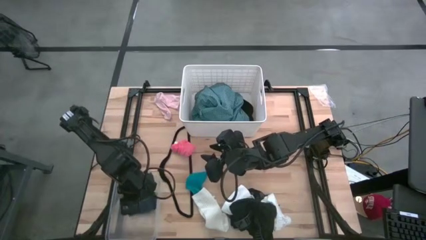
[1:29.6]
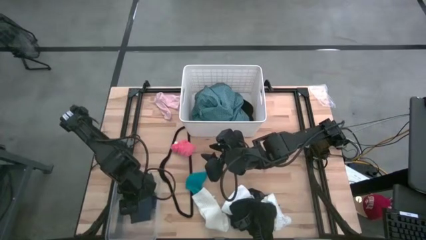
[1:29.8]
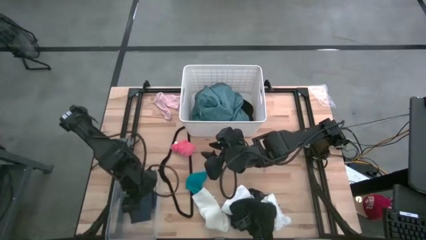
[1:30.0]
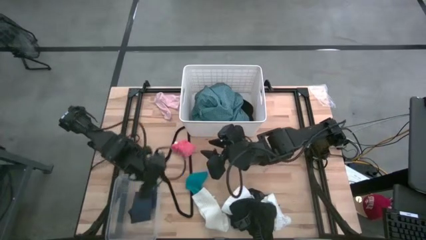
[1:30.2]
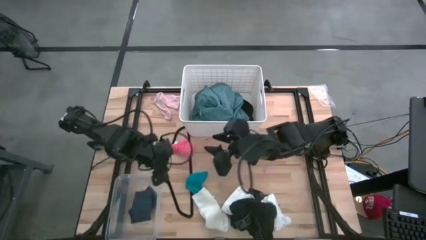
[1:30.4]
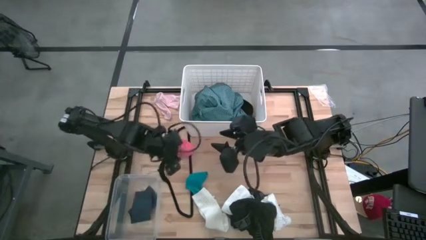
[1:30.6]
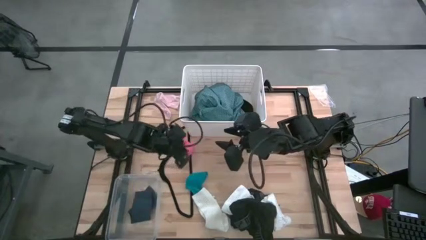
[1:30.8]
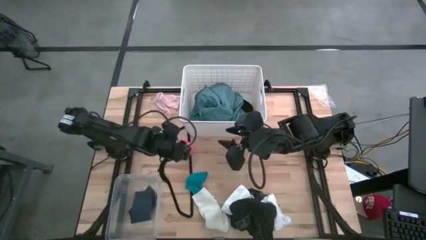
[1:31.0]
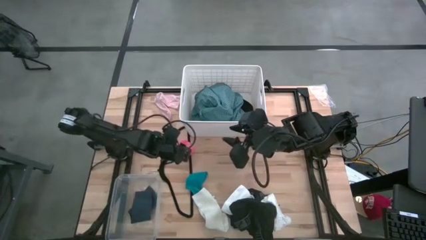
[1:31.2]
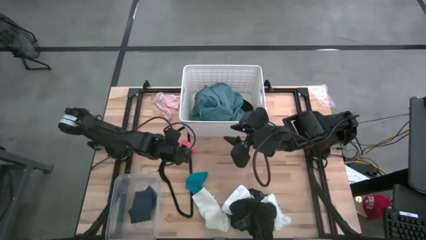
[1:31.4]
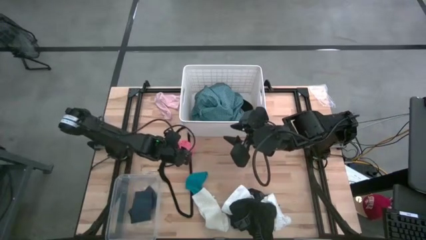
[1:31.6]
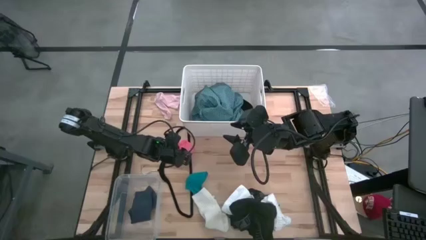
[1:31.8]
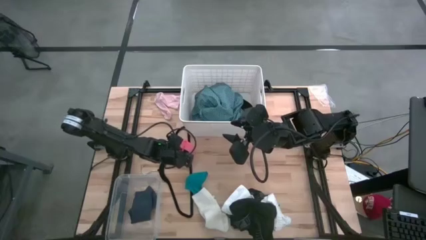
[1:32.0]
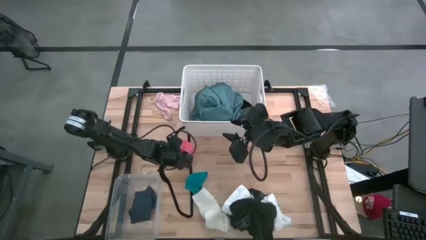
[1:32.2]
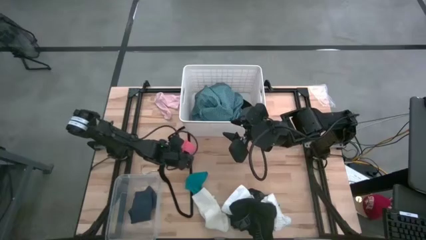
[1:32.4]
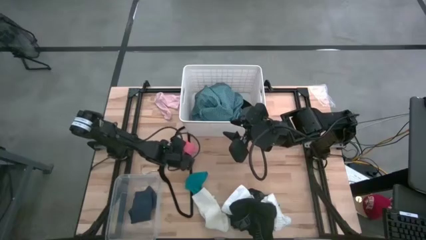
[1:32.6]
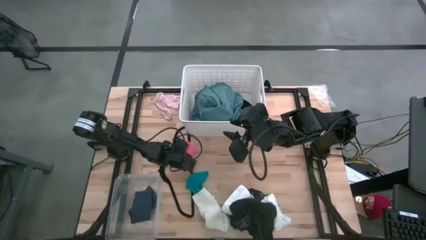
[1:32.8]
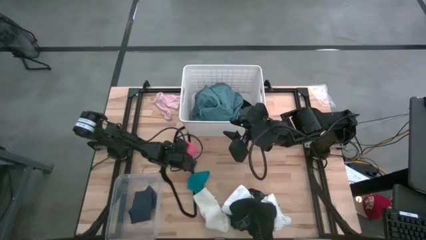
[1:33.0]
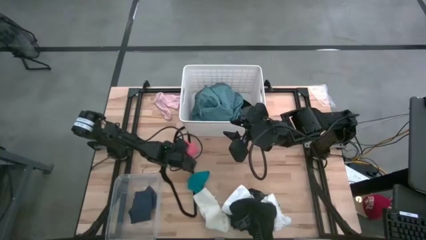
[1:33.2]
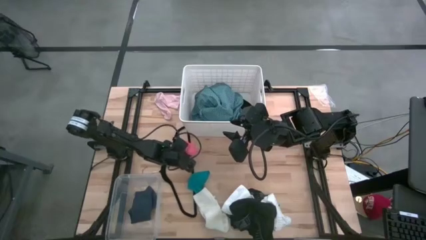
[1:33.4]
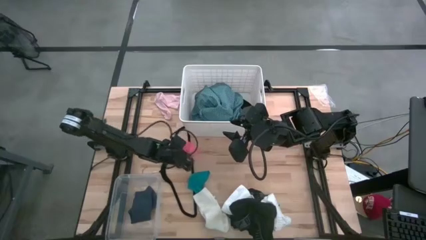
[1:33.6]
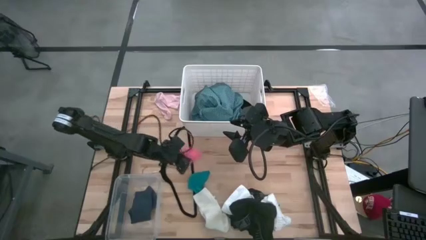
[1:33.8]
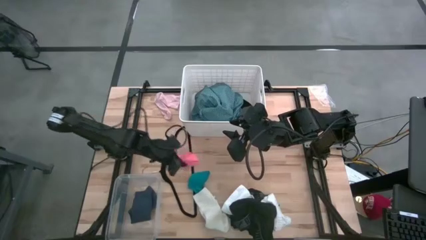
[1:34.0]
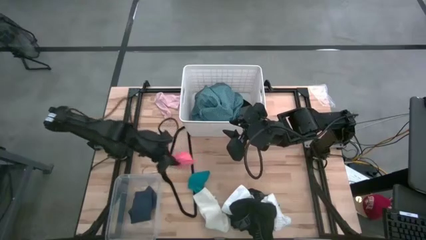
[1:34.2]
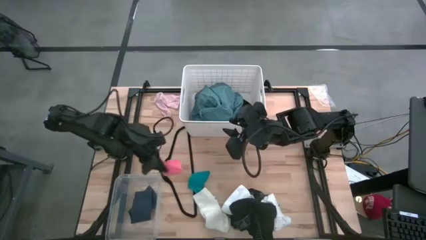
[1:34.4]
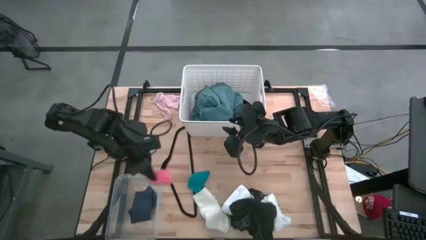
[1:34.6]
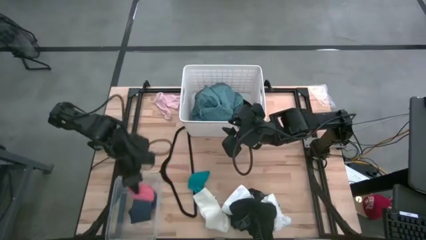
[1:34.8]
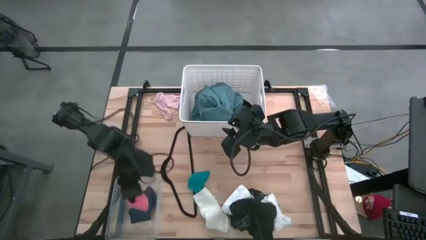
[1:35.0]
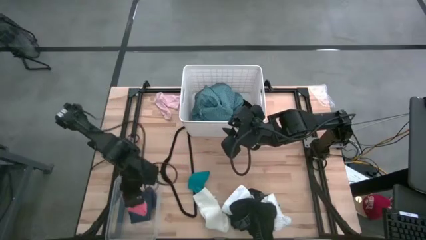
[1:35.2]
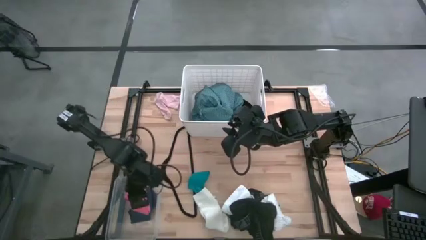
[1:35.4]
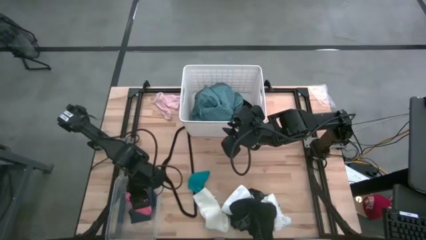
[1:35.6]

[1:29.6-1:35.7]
Task: Pick & Place Cloths
Put the orange sock into the left transparent bin

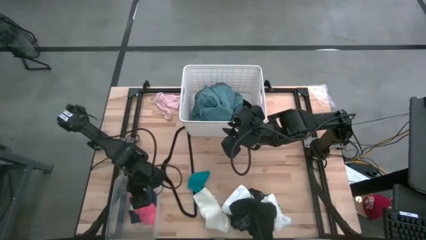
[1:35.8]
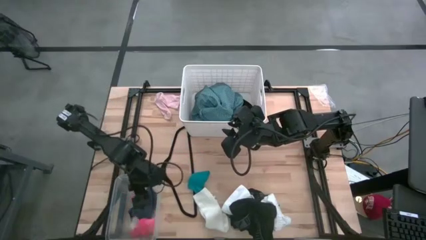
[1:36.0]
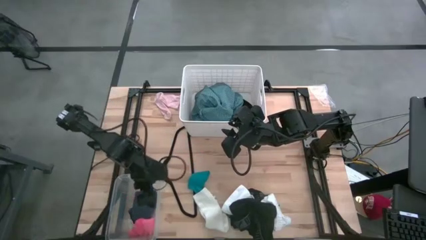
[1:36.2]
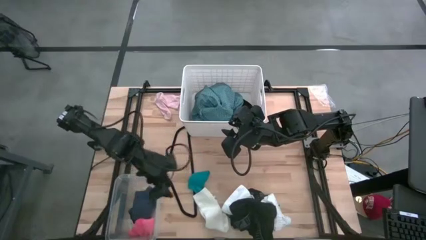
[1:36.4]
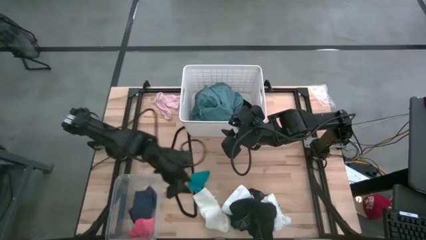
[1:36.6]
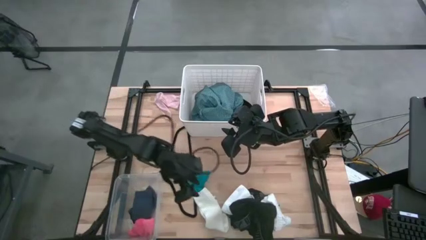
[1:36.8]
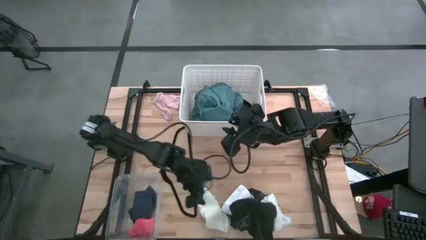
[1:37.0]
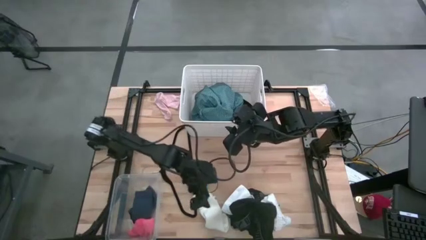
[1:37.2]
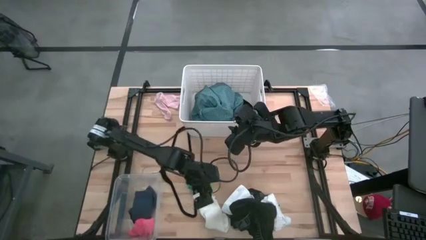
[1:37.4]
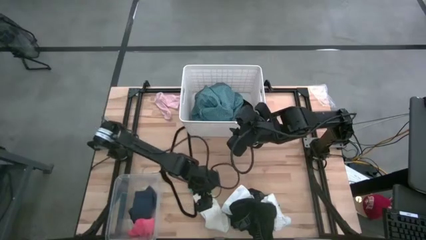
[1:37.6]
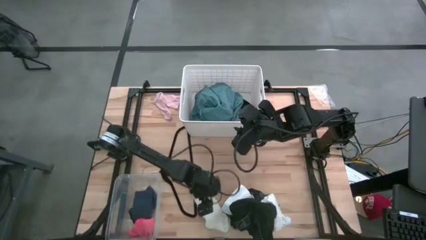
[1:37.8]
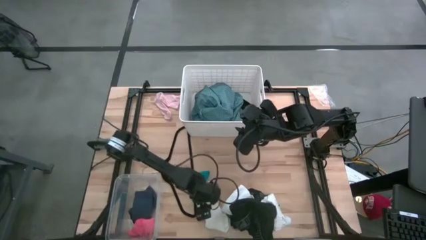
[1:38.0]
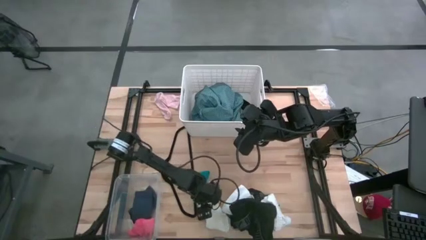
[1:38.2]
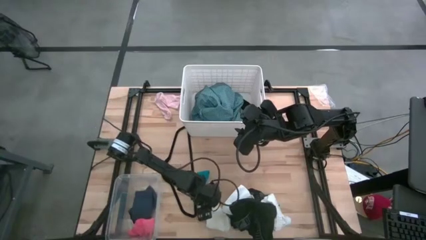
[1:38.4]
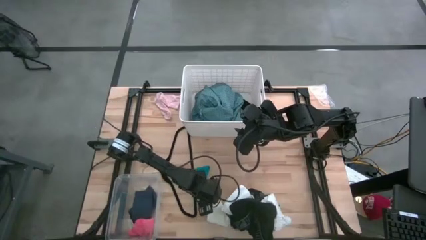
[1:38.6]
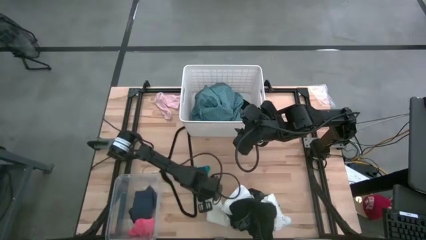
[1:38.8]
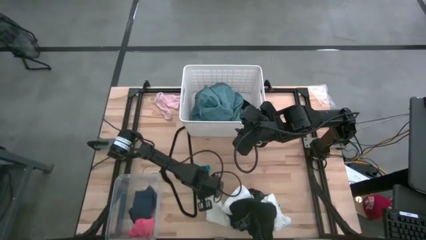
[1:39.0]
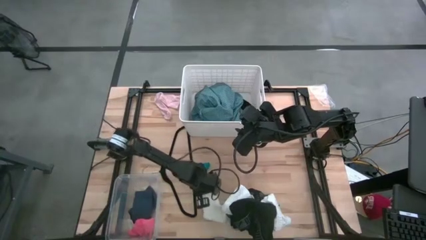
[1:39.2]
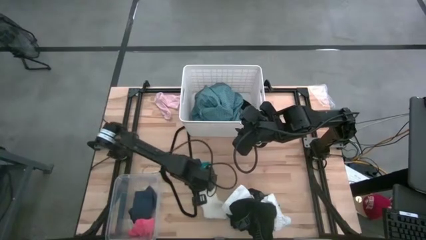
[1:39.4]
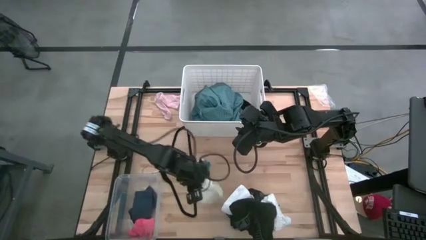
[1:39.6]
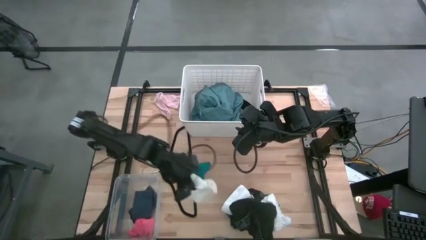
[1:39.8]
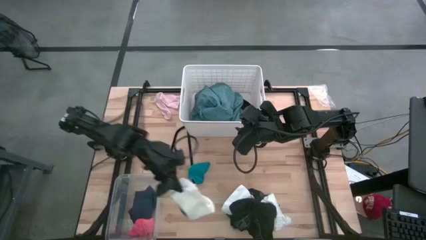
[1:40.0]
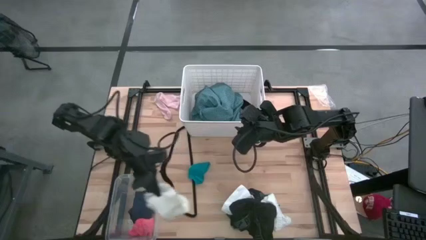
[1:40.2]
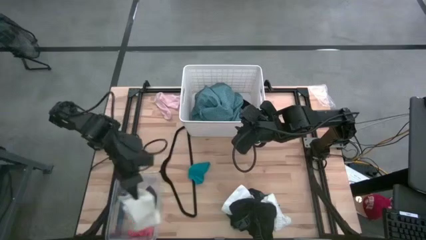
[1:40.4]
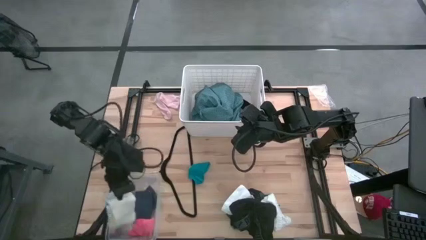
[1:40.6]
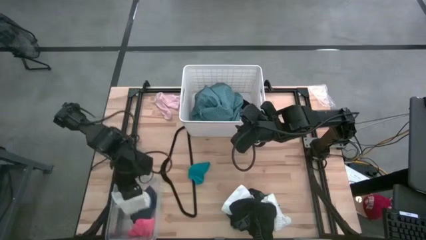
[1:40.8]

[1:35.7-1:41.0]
Put the white sock into the left transparent bin

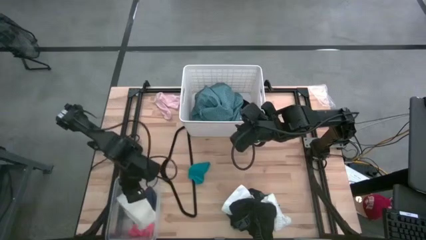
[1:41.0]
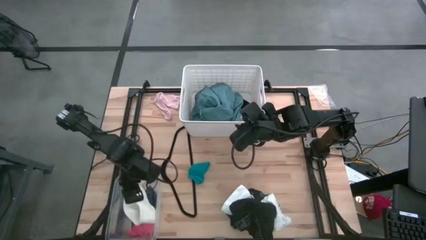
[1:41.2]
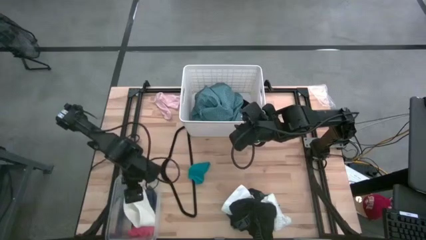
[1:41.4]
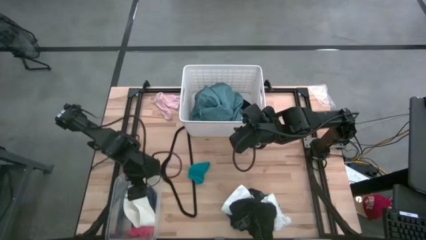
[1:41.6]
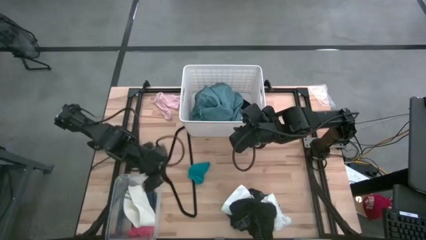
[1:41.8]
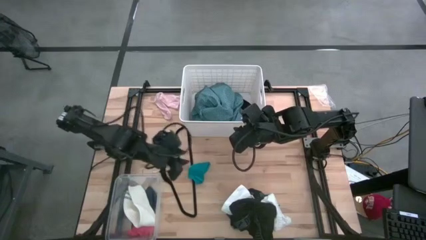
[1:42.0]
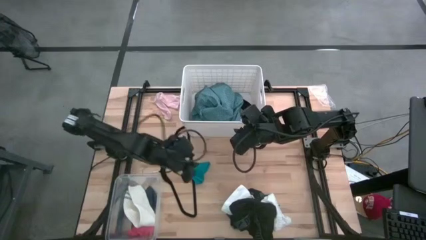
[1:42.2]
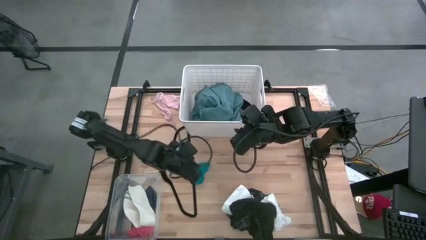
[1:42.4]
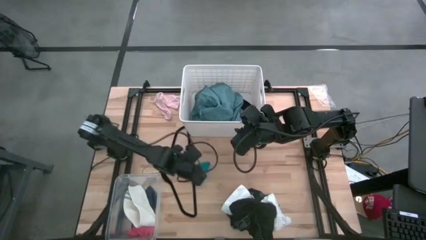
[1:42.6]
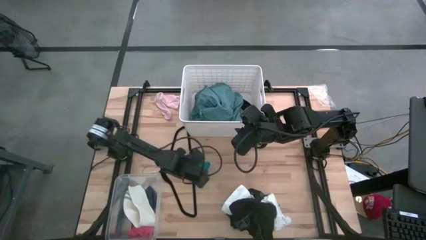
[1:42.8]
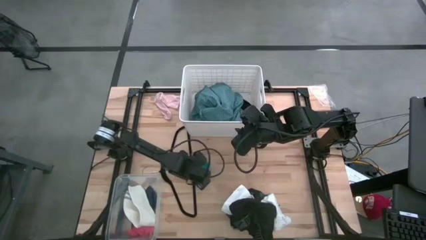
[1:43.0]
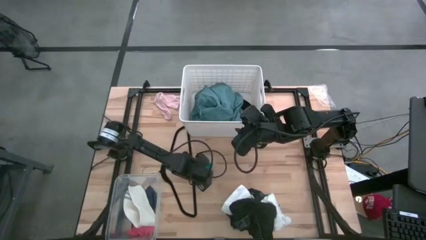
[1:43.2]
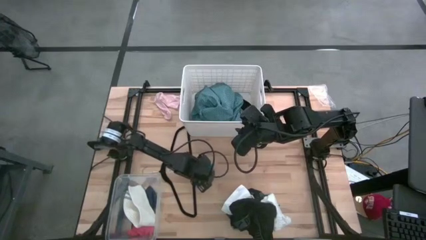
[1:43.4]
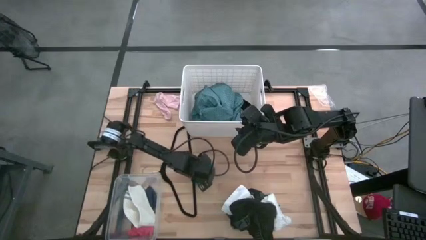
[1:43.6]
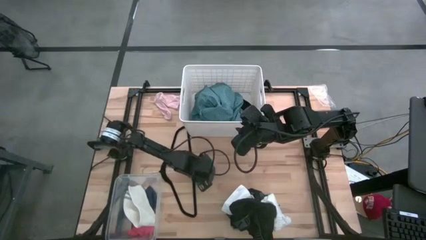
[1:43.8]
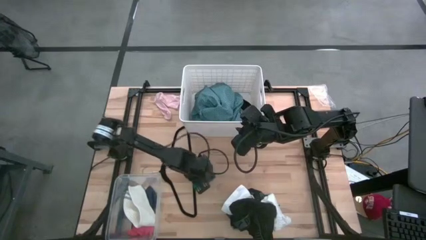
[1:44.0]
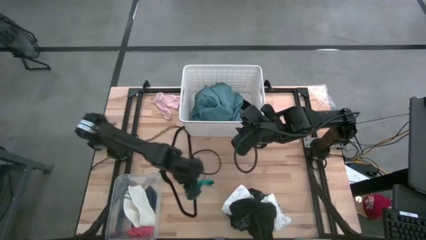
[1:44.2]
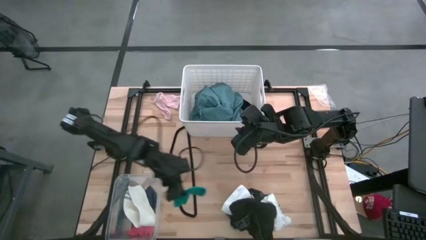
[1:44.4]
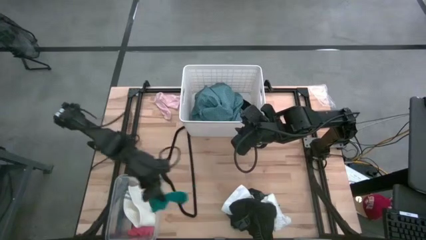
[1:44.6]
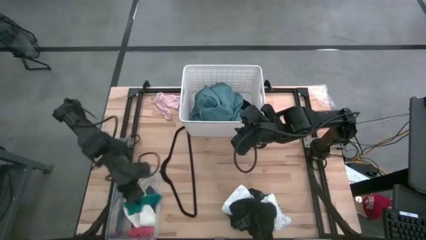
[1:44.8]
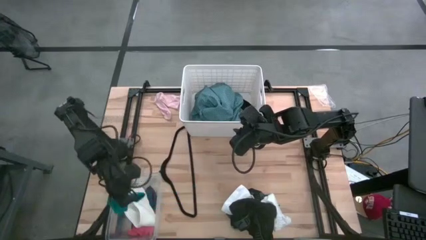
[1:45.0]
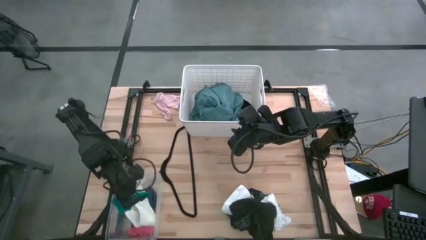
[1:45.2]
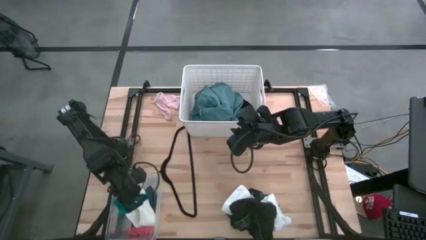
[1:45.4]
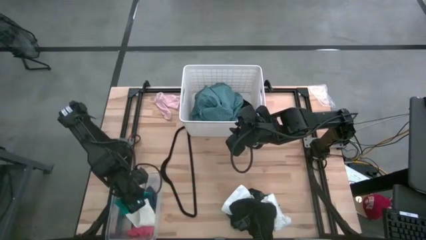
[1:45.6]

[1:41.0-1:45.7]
Put the blue sock into the left transparent bin

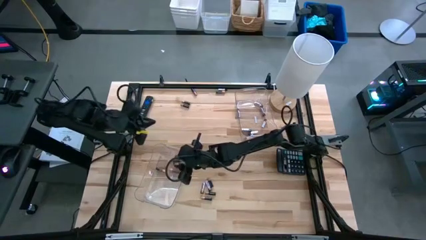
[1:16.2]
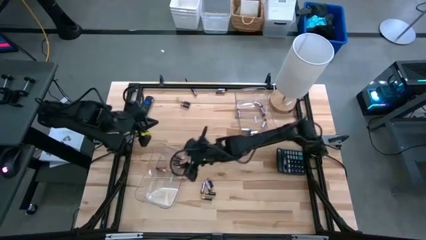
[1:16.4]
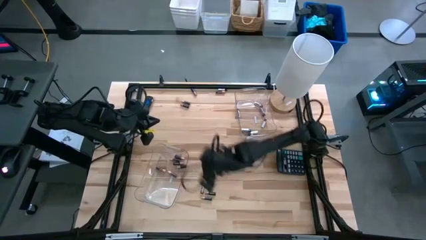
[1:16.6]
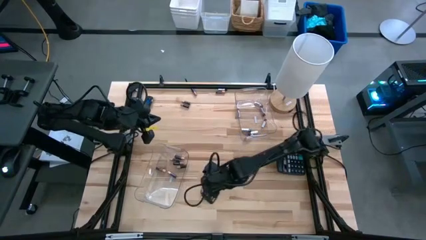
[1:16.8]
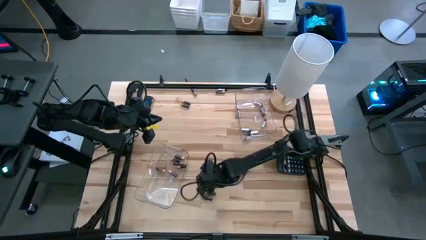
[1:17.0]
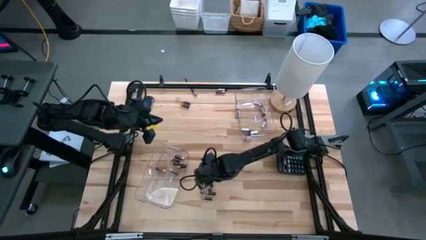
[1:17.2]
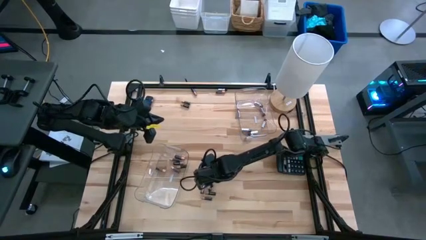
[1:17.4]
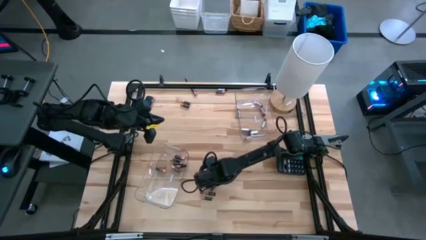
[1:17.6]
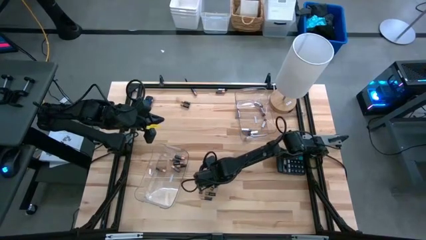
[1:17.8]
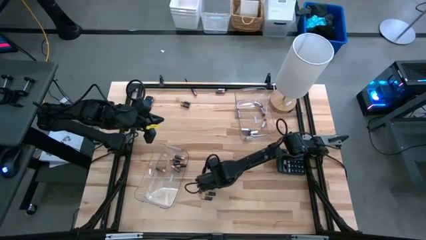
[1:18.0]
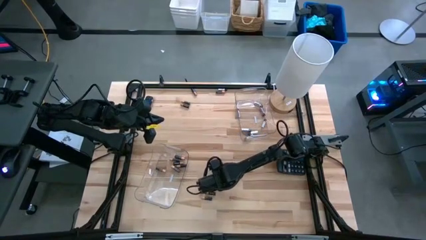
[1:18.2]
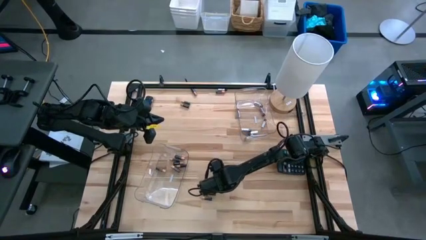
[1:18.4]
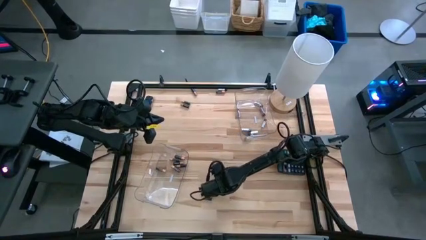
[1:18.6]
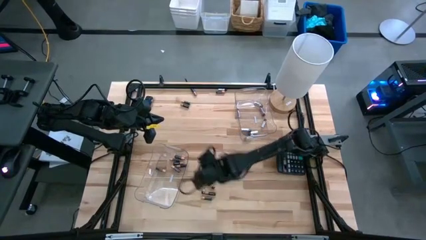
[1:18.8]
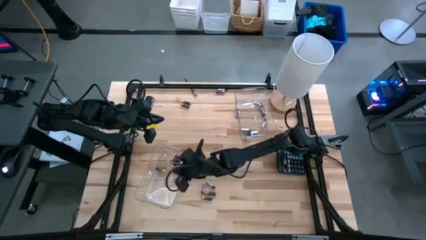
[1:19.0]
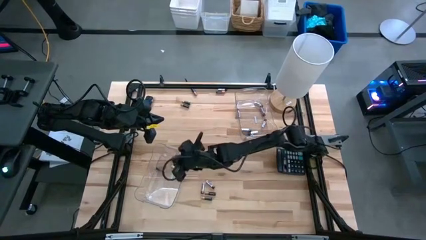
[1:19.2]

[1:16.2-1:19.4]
Task: Sort batteries
Put the brown battery into the left transparent bin
